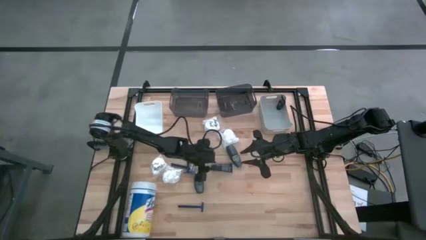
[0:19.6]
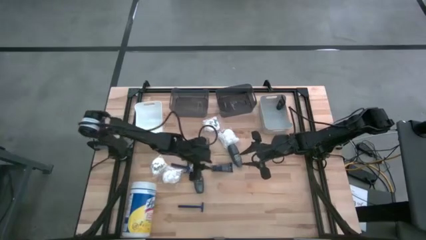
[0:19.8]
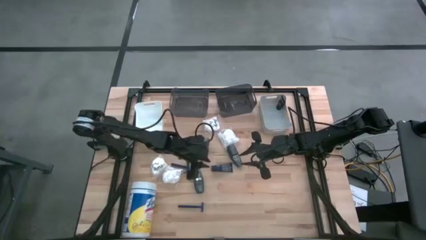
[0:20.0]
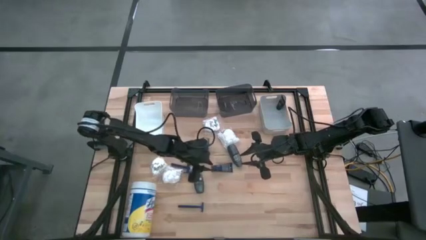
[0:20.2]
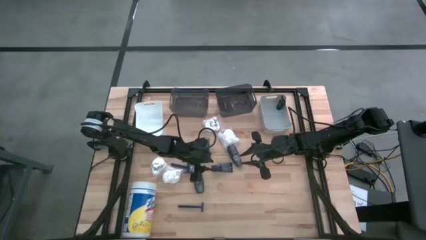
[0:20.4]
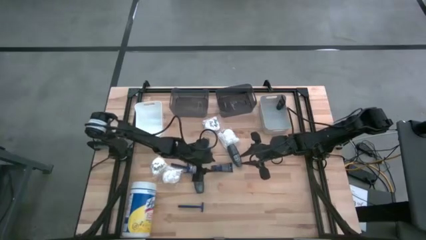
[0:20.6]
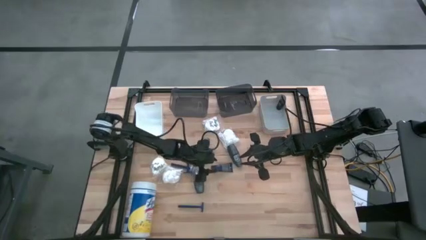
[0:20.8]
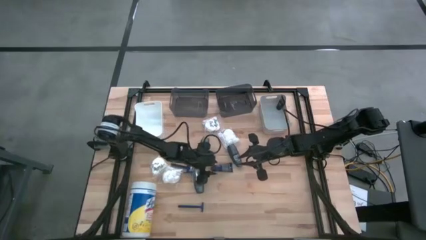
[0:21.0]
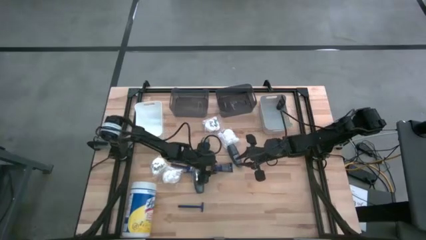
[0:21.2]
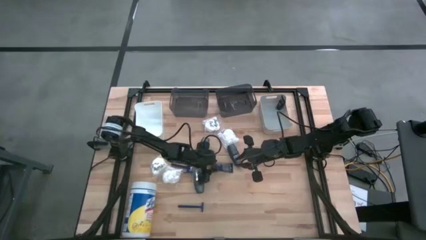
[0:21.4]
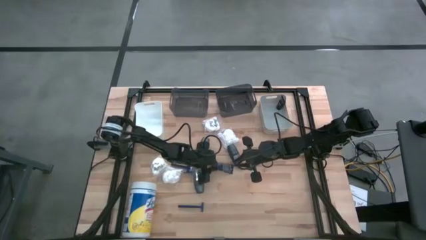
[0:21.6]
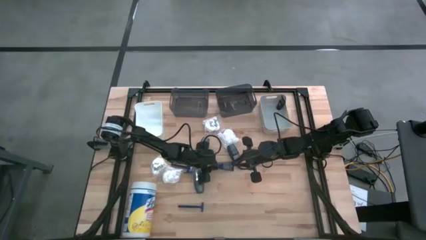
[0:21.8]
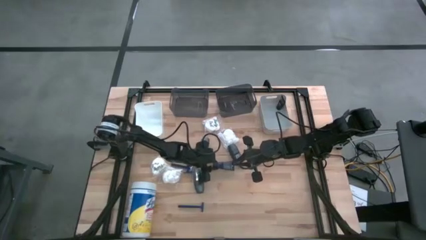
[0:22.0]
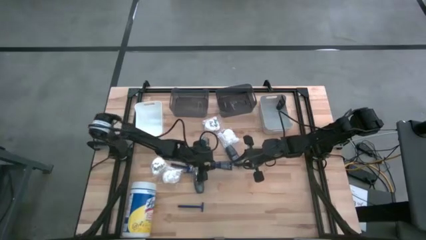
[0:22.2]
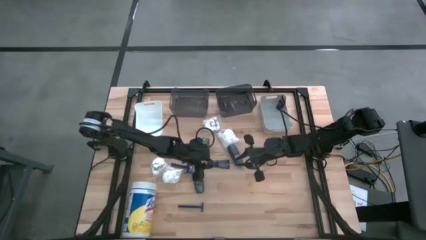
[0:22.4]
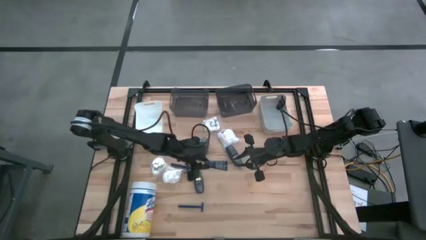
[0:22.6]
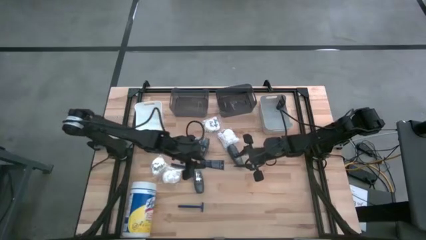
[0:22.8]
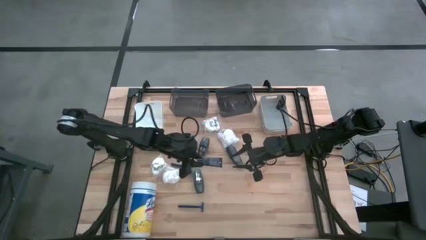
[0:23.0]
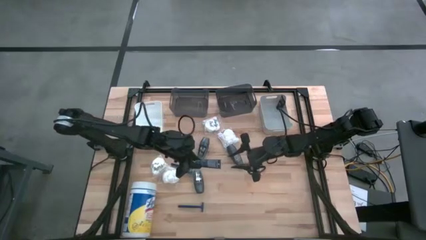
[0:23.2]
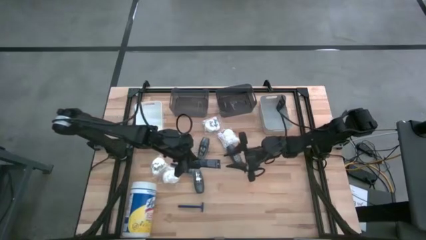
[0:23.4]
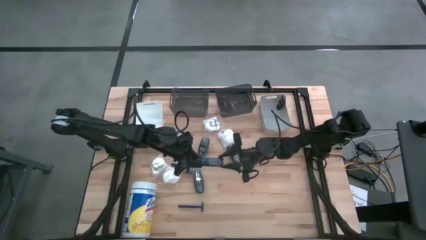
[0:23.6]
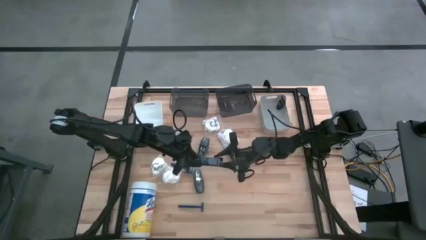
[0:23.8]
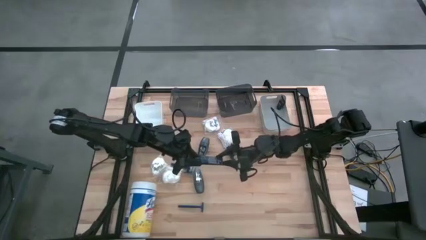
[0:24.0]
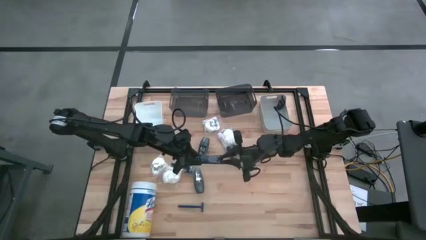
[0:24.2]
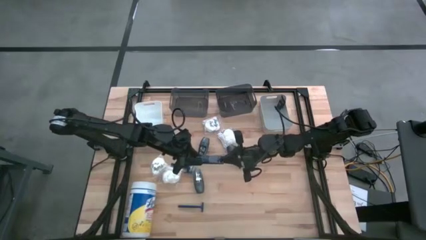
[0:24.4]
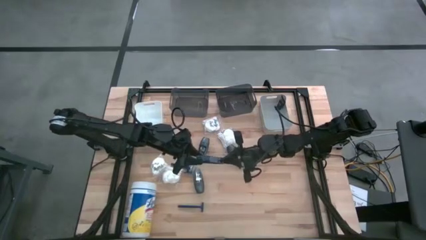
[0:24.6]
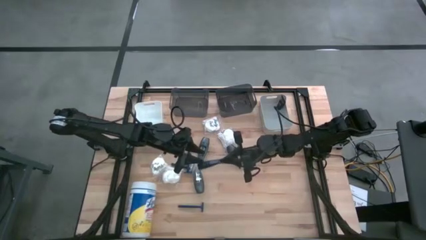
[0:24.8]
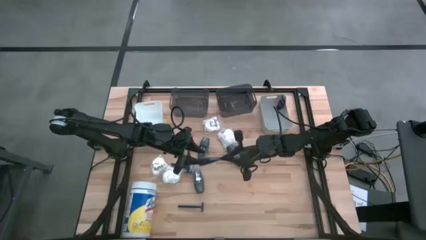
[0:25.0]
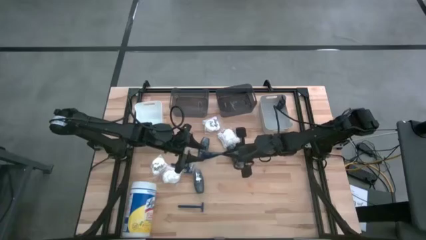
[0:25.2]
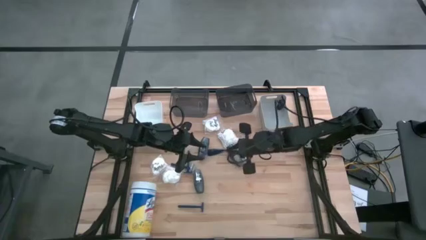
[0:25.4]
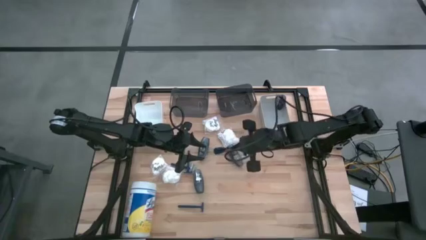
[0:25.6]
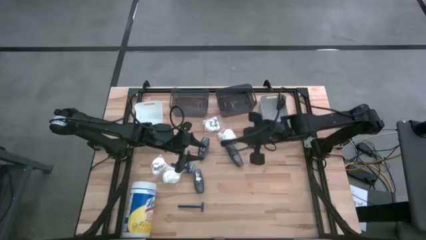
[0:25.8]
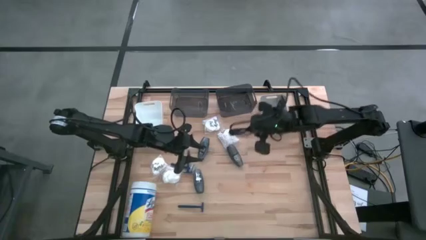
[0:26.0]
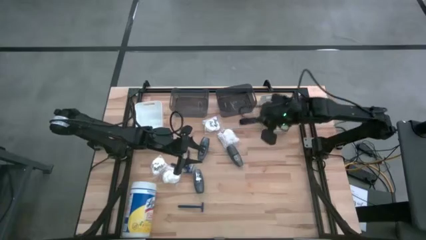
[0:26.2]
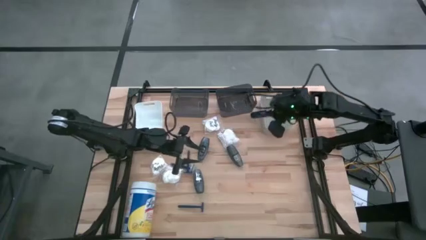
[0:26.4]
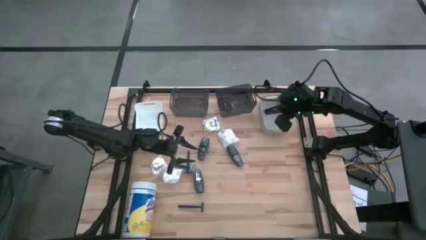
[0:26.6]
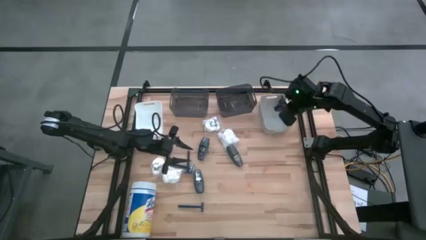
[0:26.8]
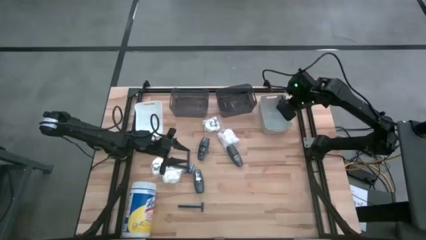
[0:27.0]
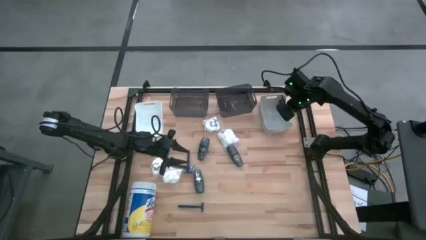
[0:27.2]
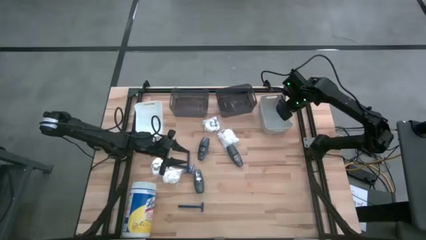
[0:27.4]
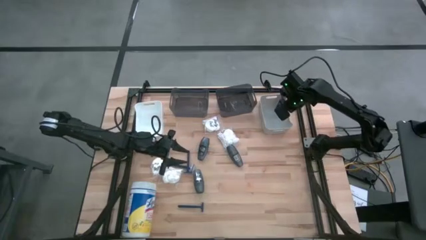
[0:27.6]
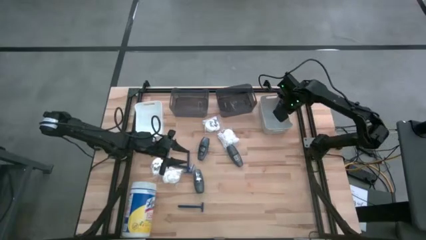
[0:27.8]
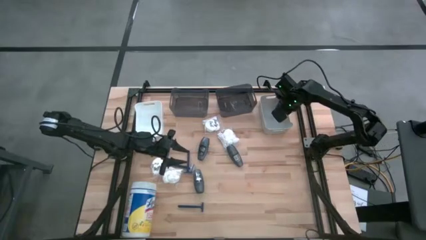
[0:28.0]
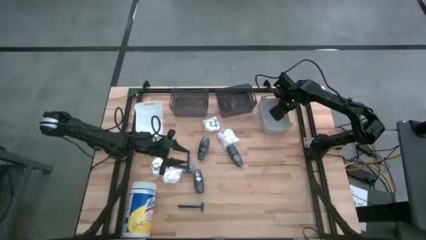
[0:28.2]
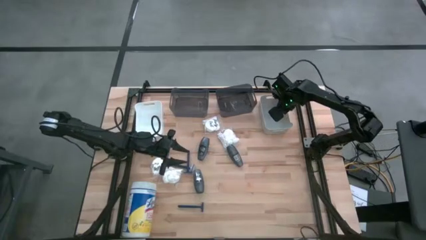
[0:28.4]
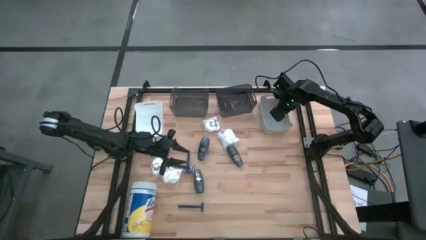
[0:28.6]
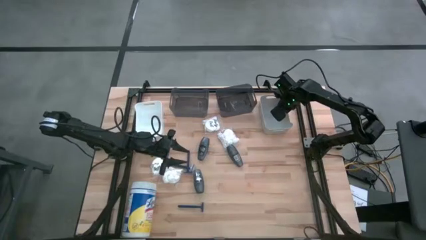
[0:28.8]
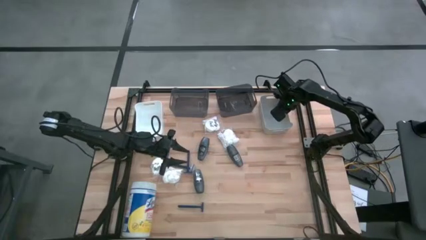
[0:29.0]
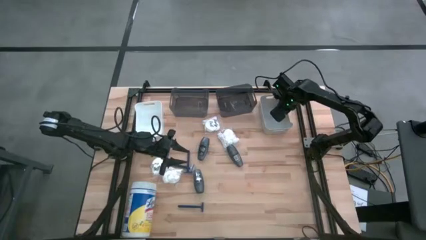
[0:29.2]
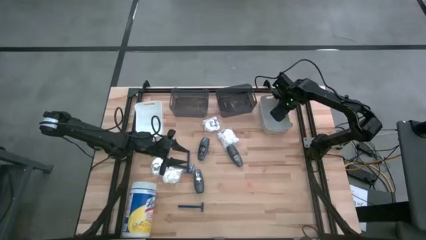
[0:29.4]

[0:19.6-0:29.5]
Task: Pick & Place Travel size toiletries
Put the blue shave cream into the gray bin
